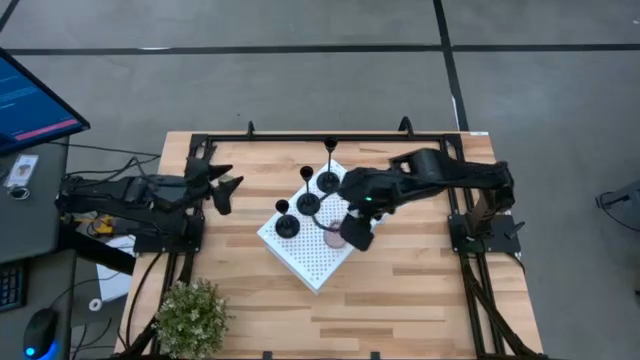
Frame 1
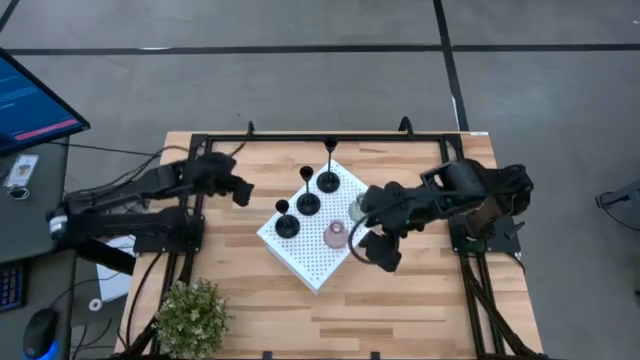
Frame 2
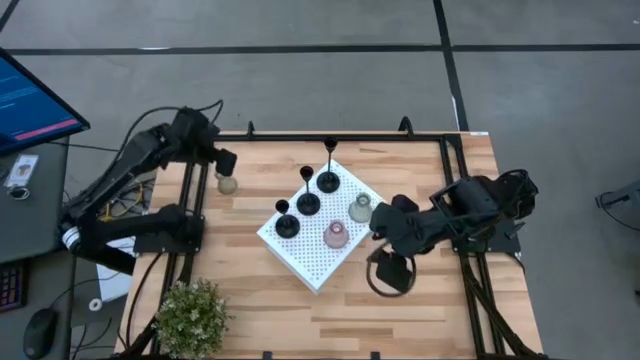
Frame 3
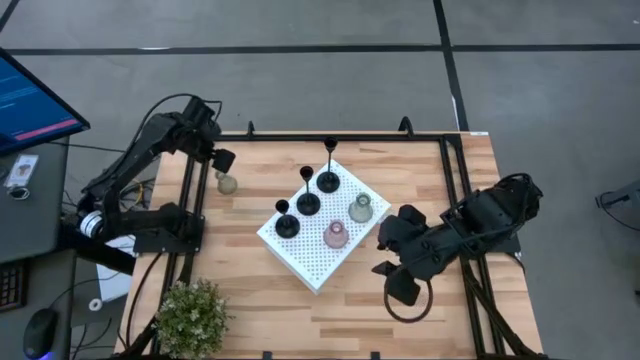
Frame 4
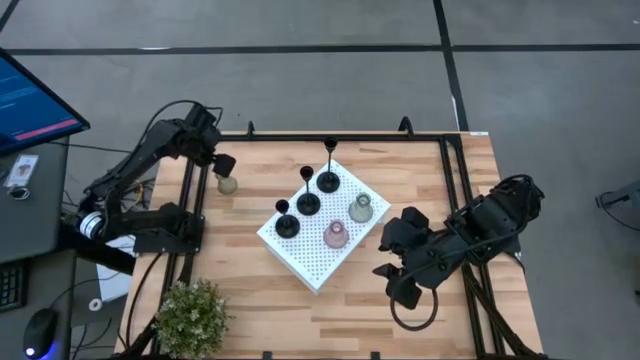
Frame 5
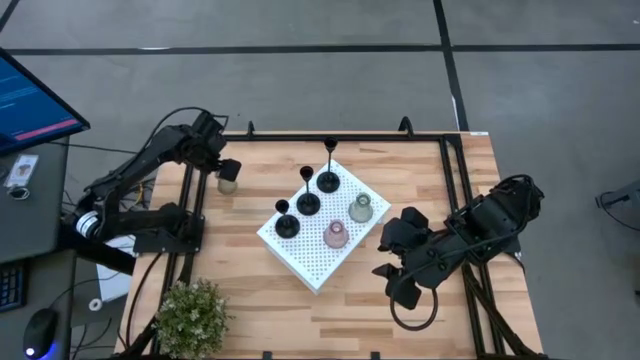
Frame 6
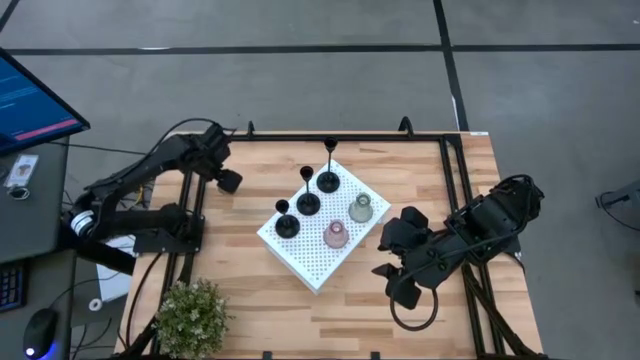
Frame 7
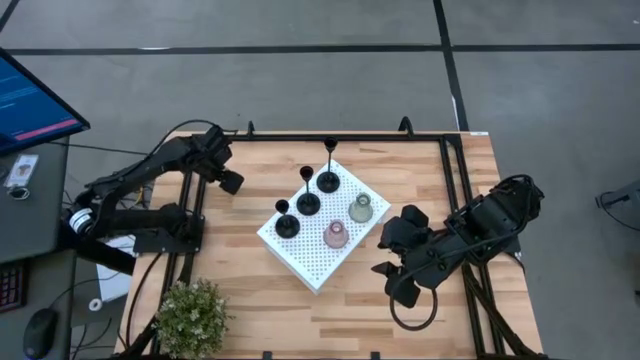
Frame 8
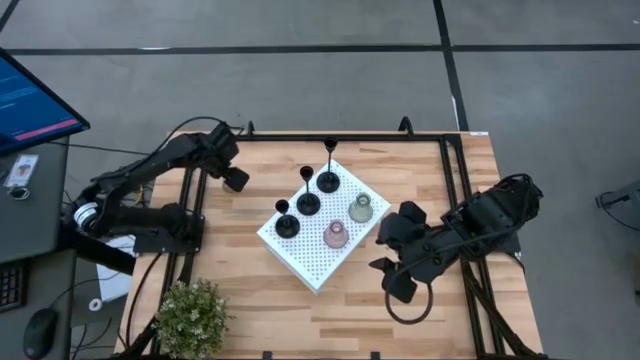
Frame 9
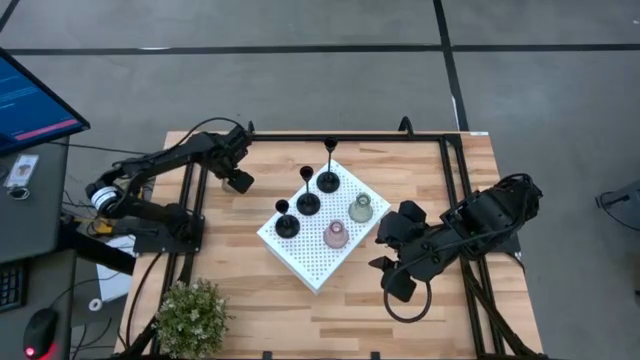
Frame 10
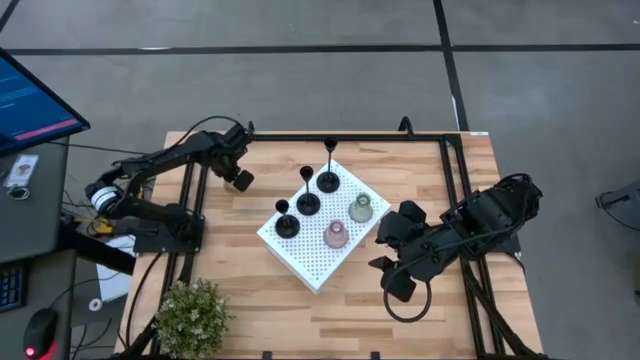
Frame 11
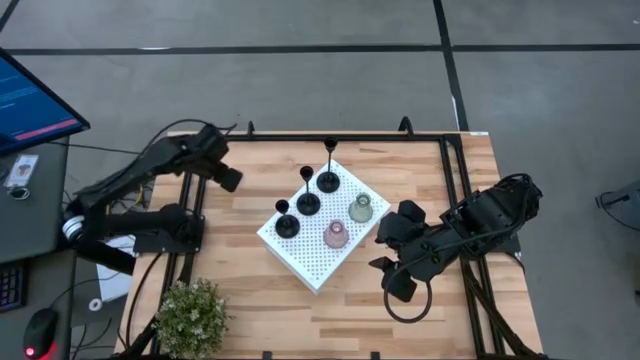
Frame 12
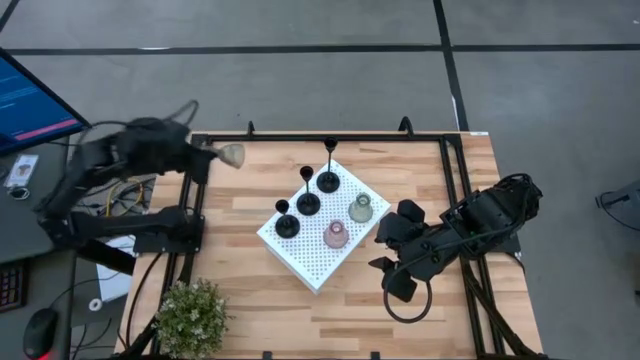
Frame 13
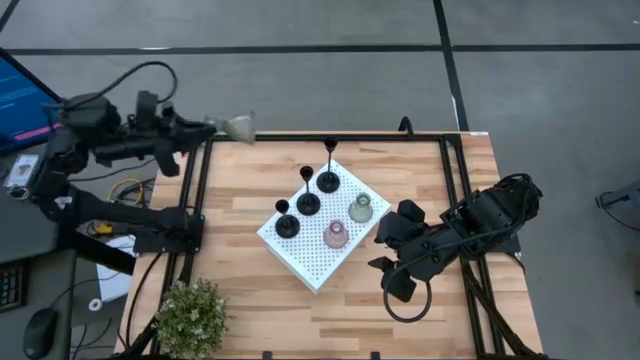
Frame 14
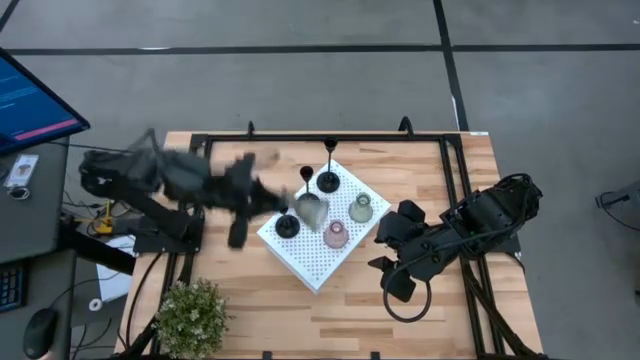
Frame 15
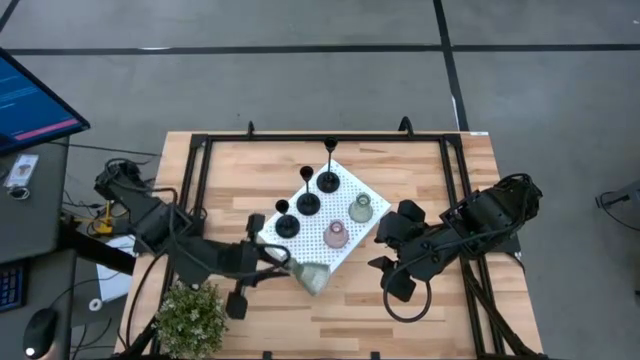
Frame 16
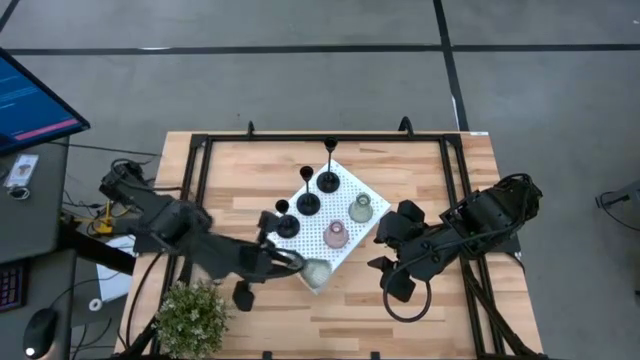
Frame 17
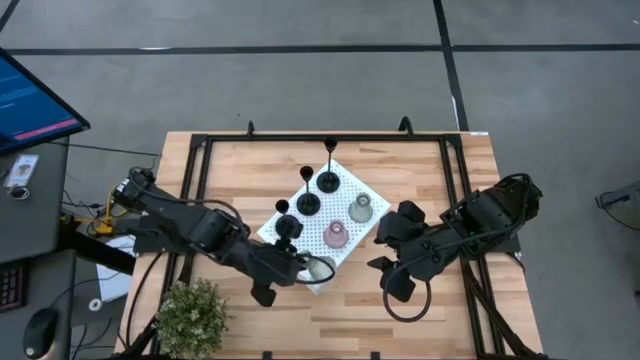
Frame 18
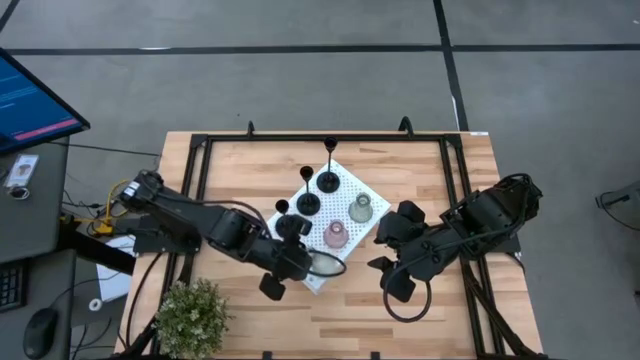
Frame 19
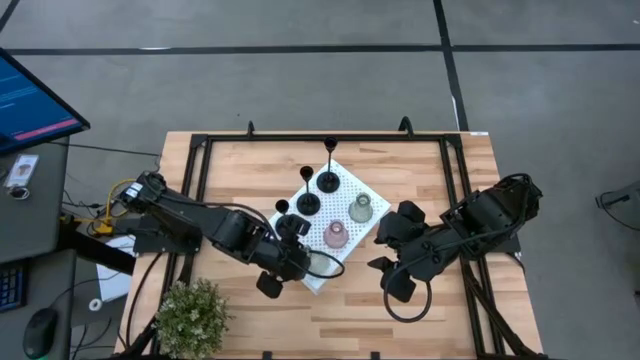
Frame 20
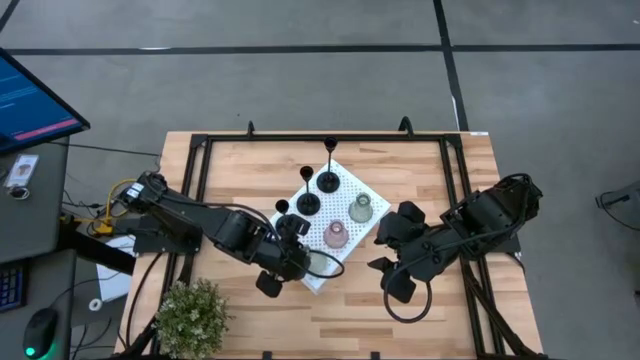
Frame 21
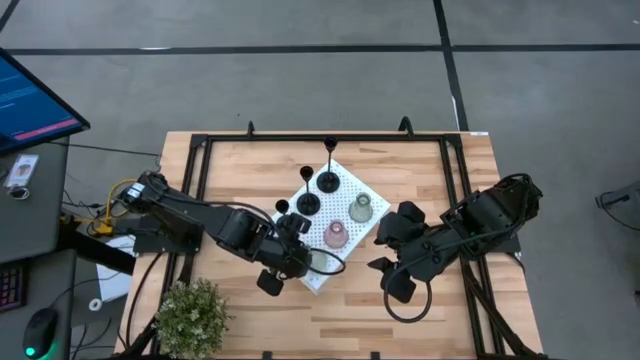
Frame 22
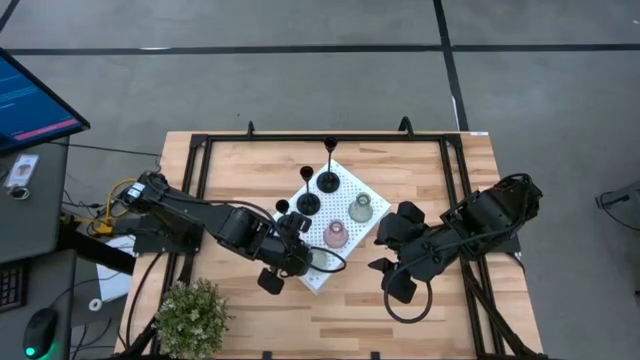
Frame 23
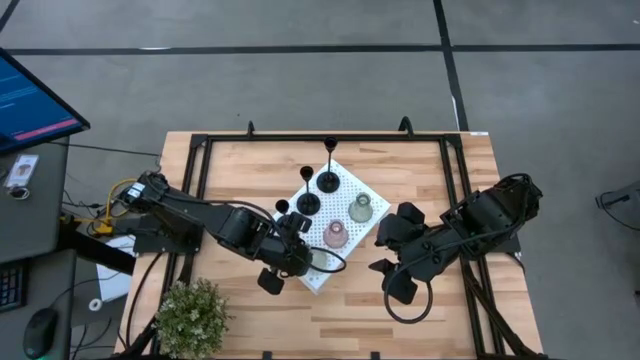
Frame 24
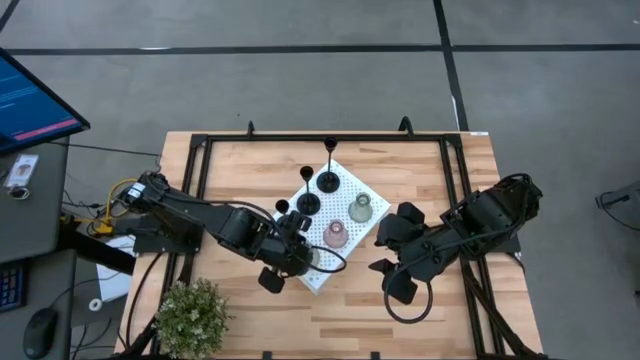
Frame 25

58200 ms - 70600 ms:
Task: Pick & Place candle stick holders
Put the green glass candle holder on the shelf

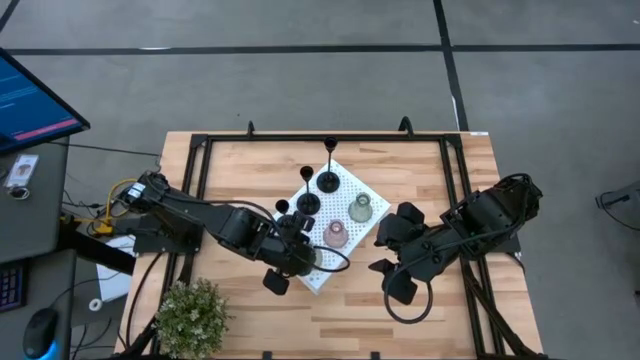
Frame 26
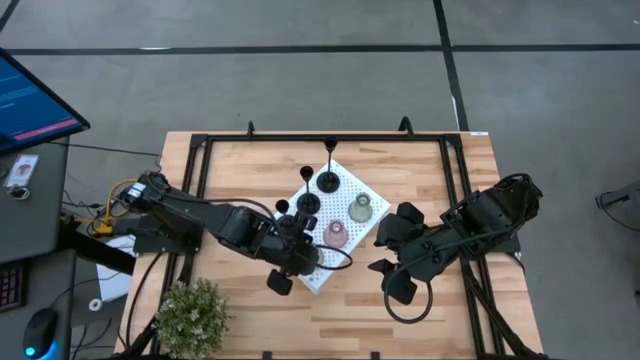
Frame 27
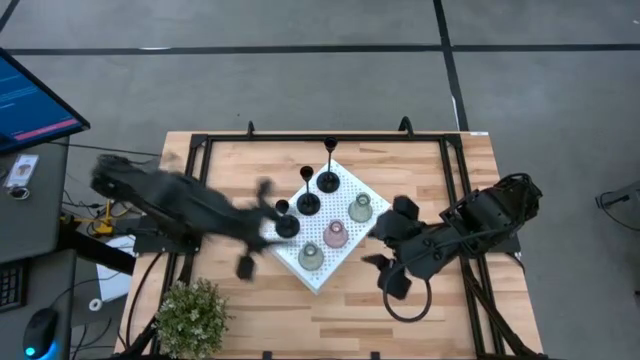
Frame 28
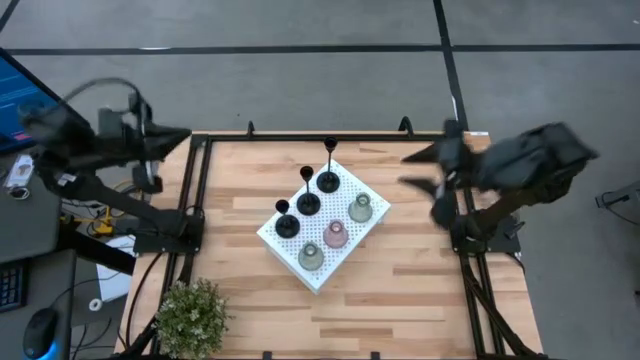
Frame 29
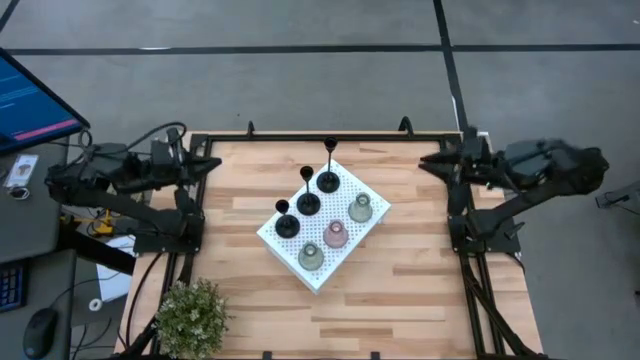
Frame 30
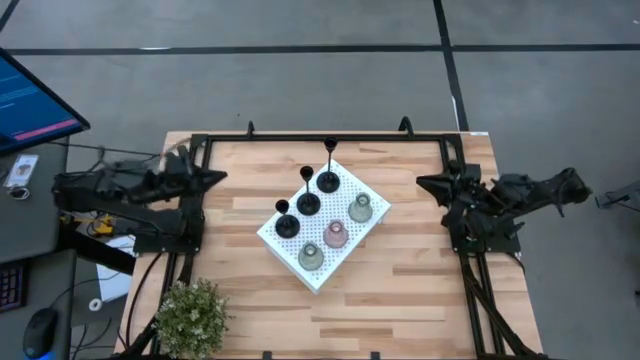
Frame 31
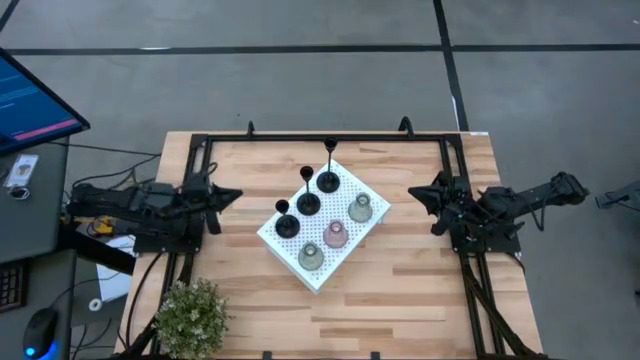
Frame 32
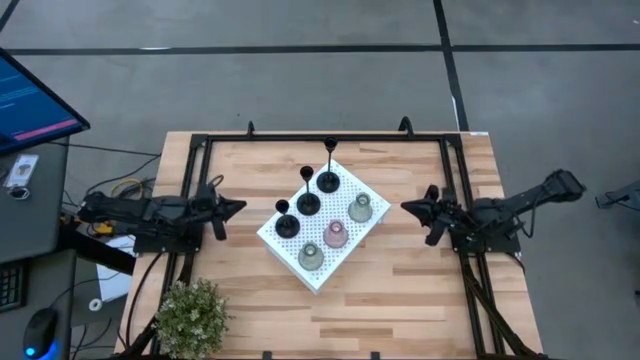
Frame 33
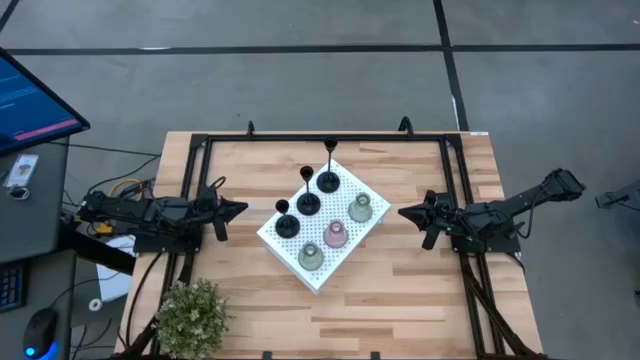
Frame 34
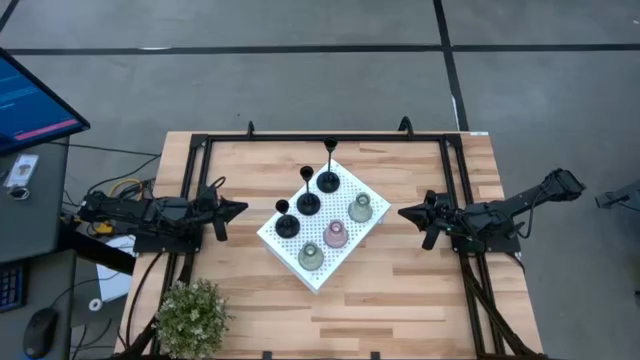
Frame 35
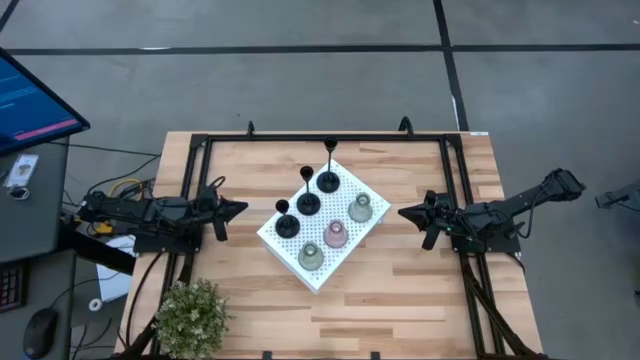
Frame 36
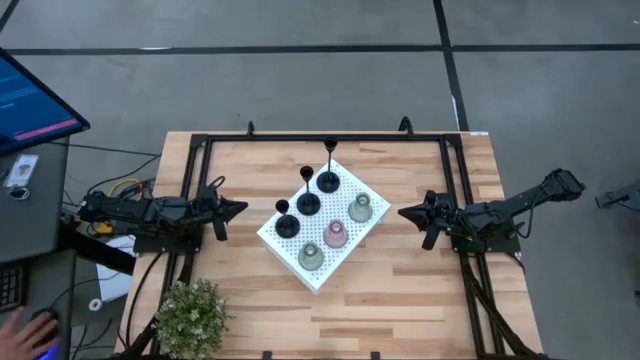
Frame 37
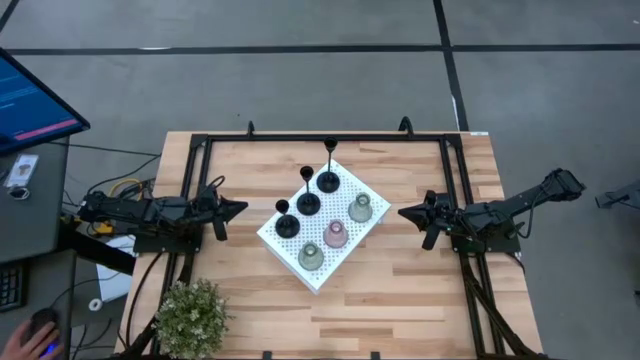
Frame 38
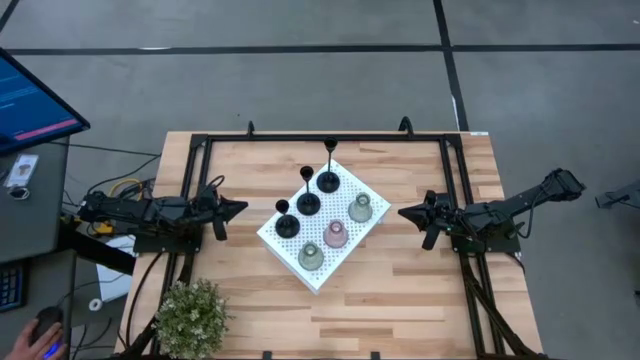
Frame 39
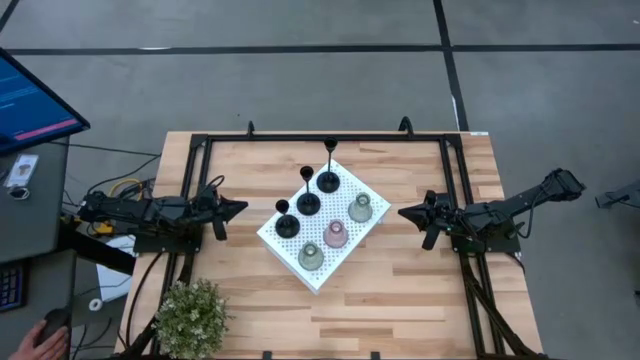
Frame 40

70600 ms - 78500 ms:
Return to Home Position

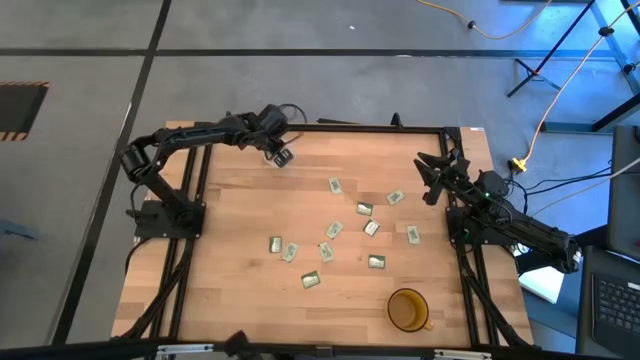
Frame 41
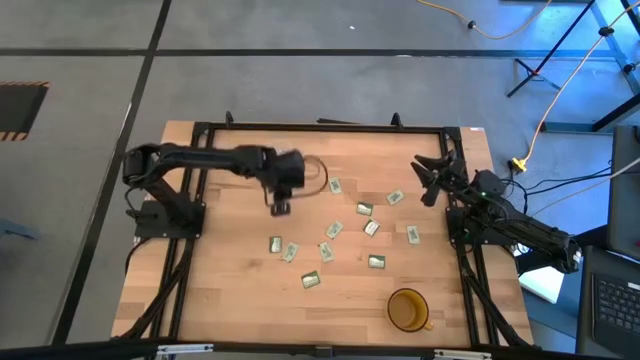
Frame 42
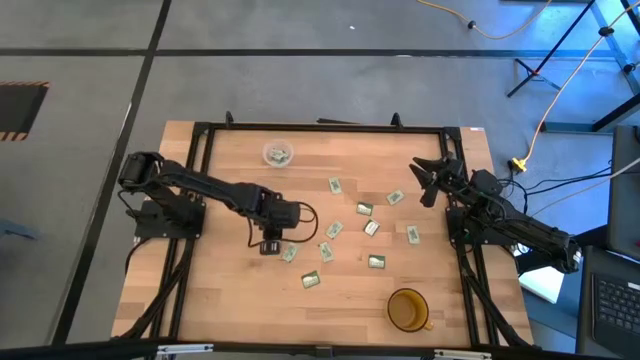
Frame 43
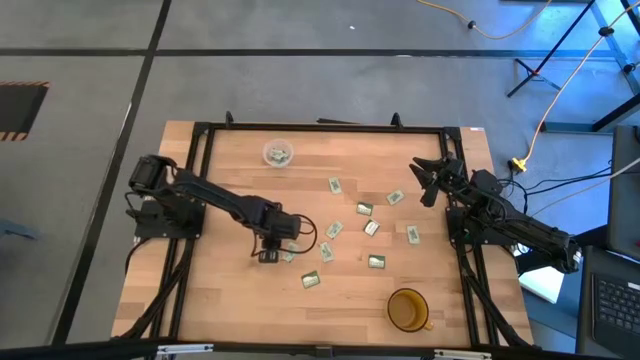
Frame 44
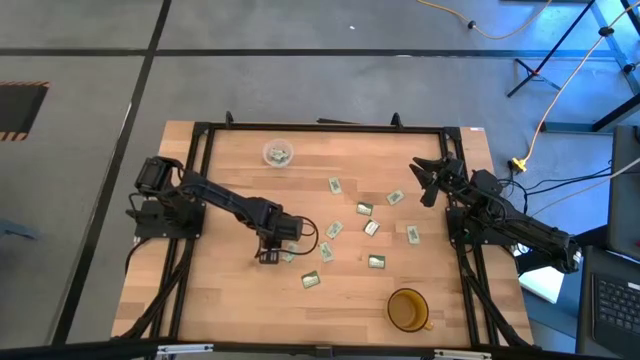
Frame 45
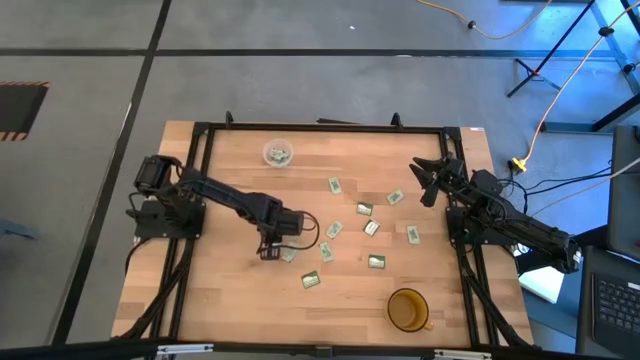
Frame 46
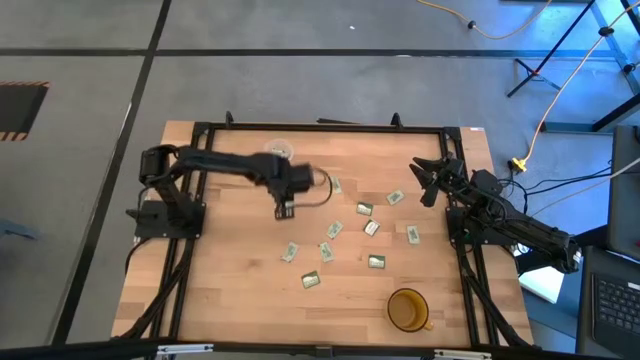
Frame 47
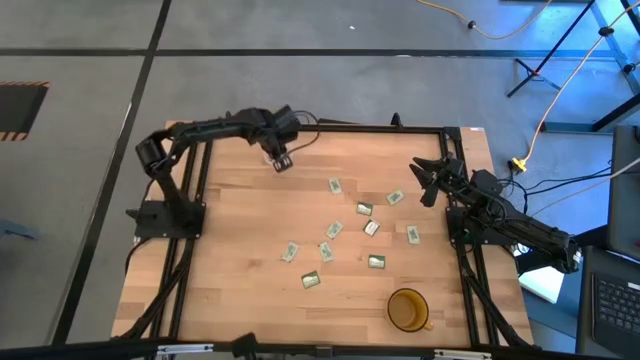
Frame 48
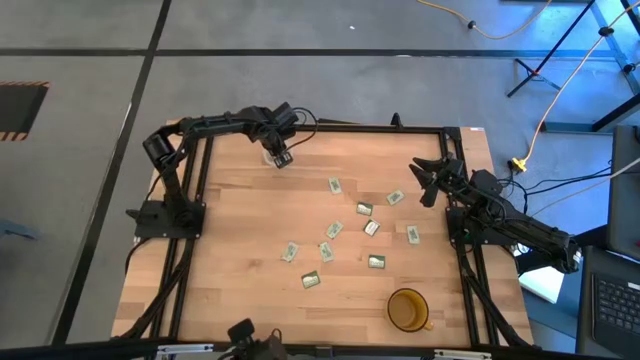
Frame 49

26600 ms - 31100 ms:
Task: Pick and place Stevia / Truvia into bins
Put the truvia packet into the transparent container
